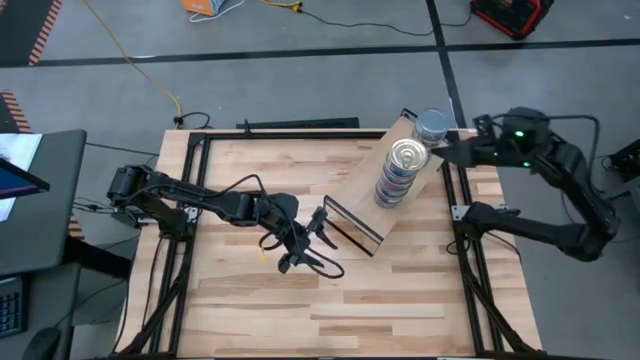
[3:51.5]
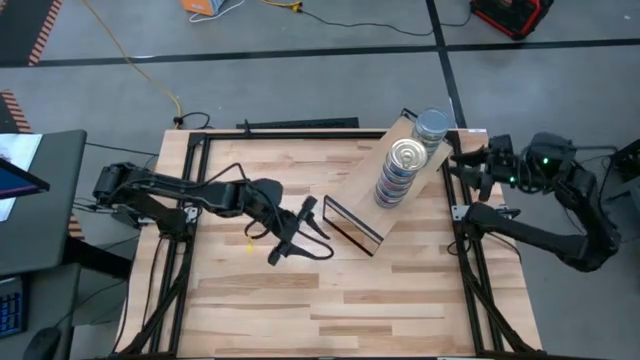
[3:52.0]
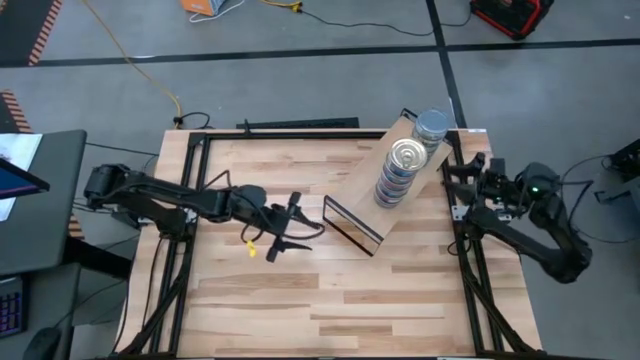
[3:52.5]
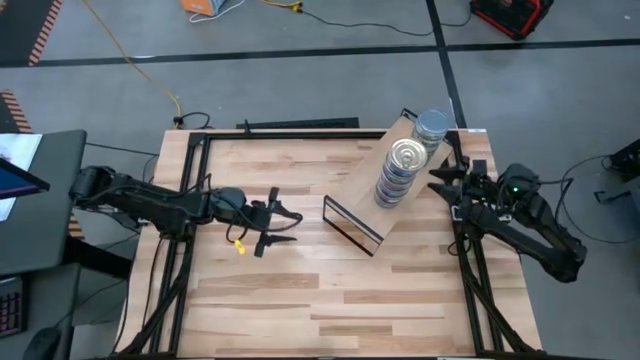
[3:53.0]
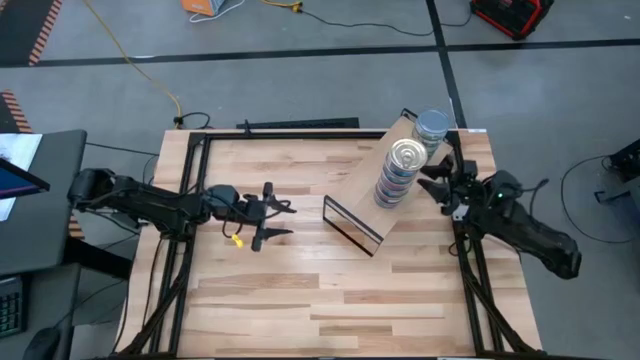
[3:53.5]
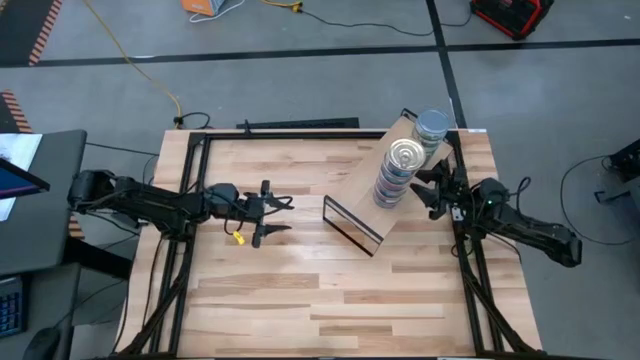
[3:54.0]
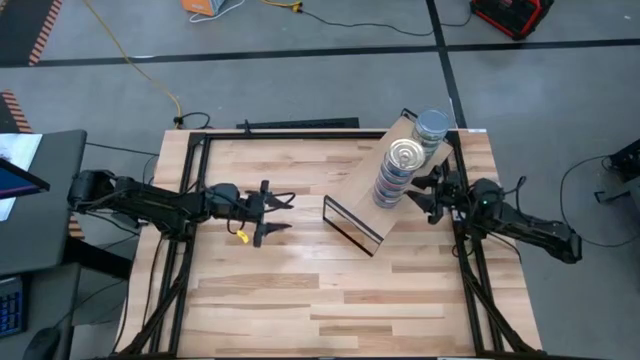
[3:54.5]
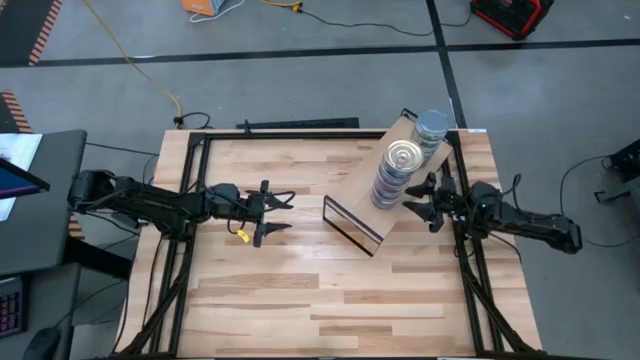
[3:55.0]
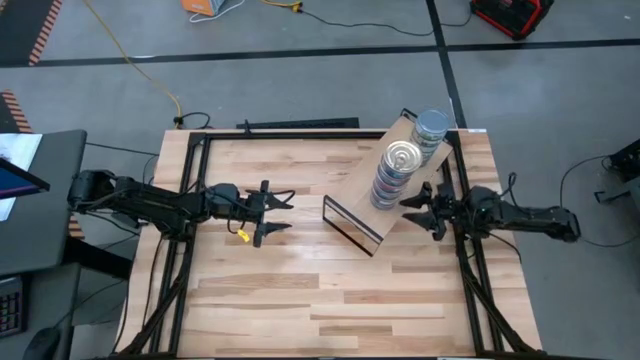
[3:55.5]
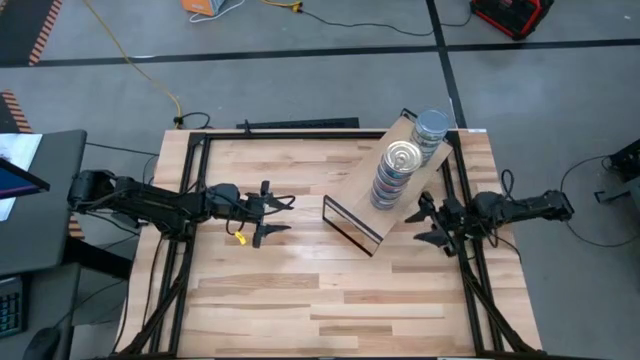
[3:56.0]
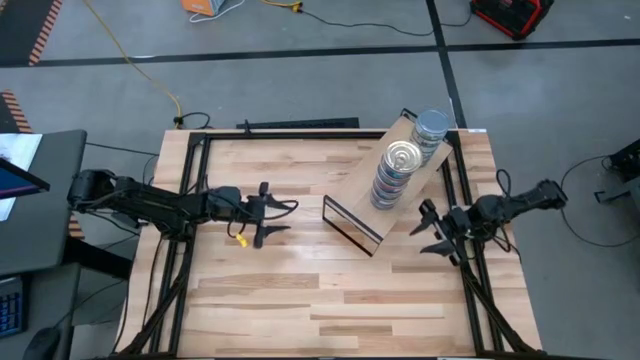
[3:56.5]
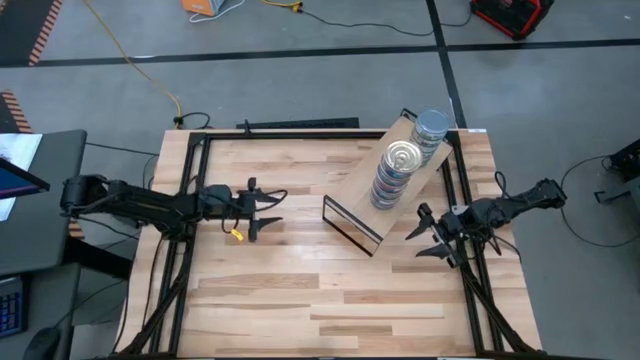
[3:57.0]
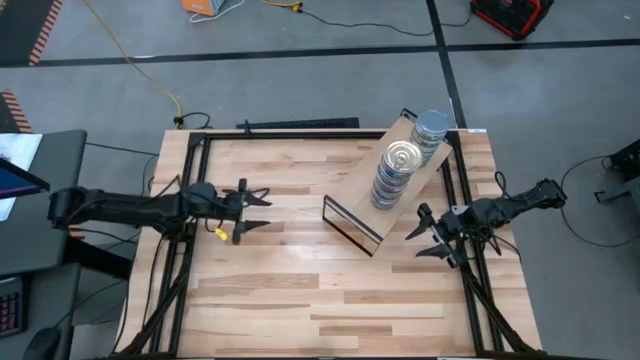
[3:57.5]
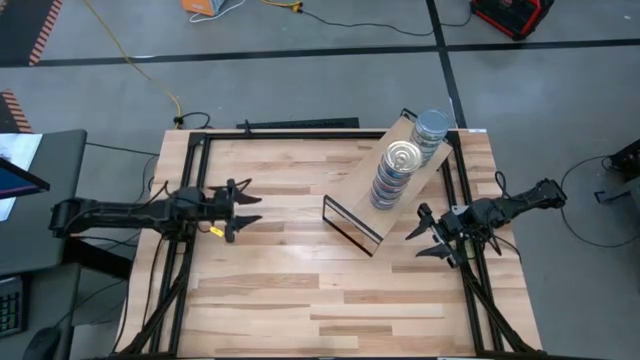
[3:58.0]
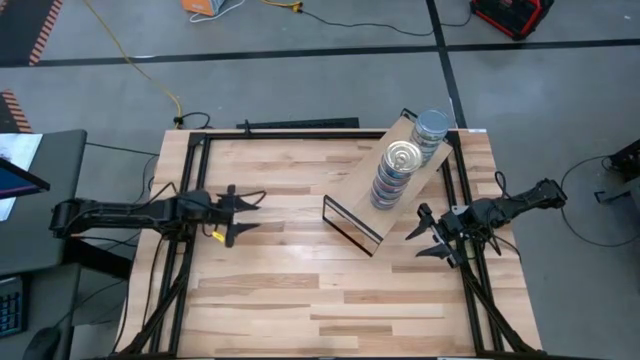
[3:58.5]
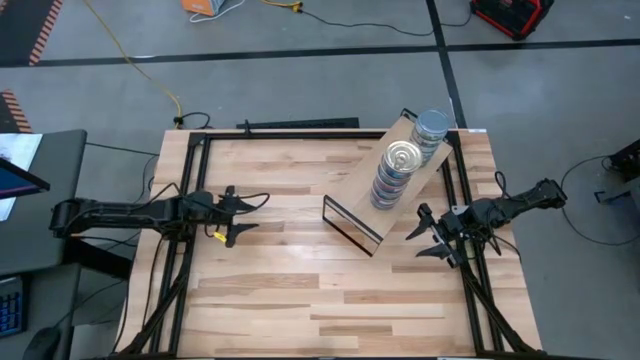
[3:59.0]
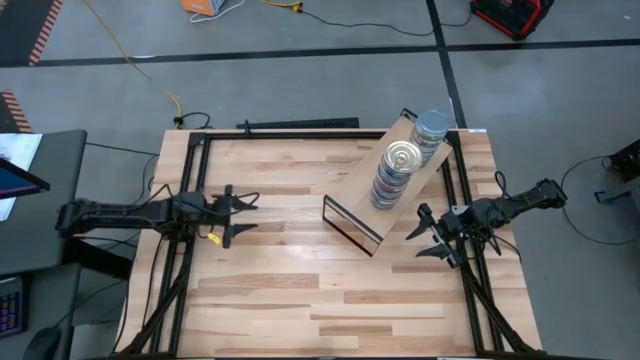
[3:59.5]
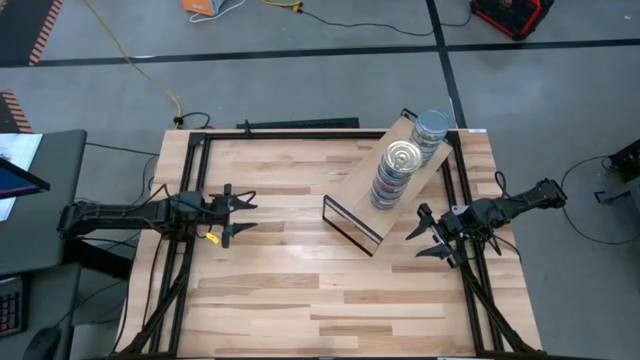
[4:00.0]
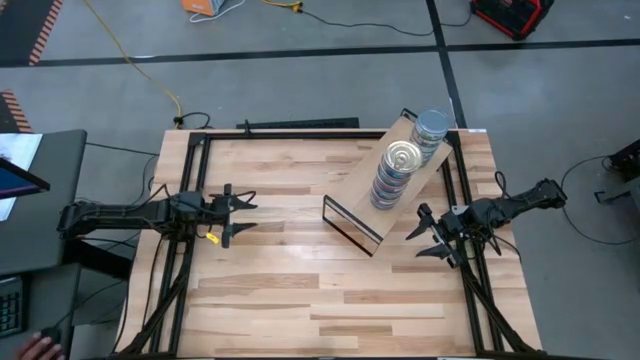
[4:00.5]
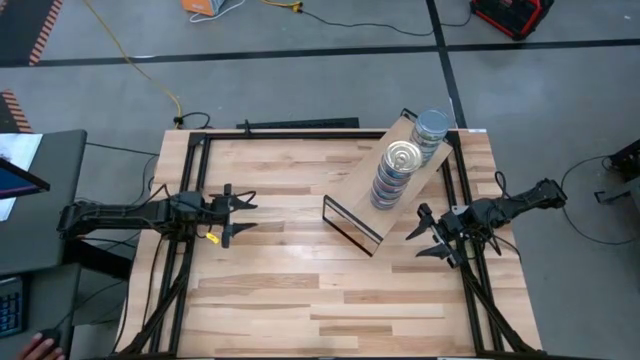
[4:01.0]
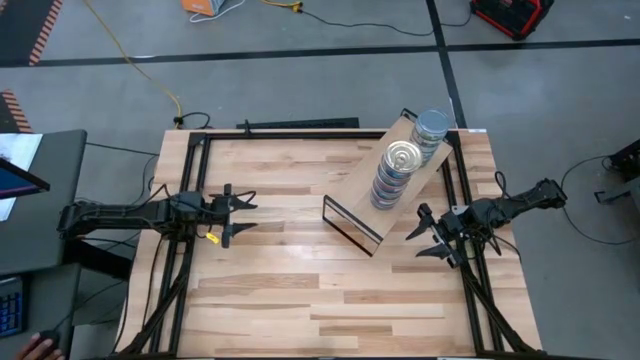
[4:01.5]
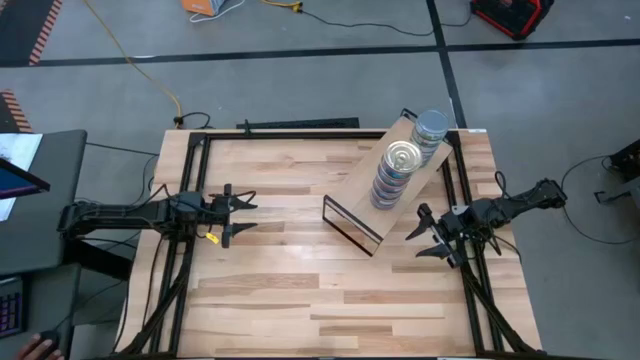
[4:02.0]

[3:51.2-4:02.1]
Task: Stack canned seafood by type on shelf
Return to Home Position

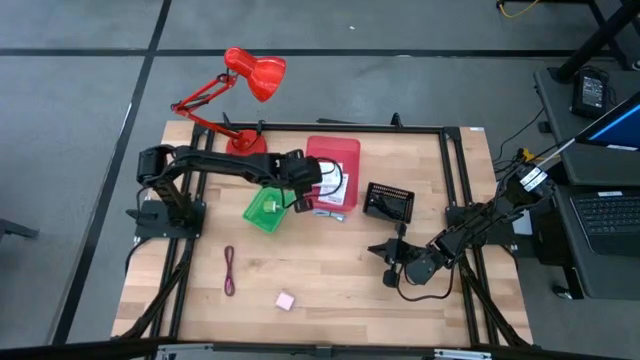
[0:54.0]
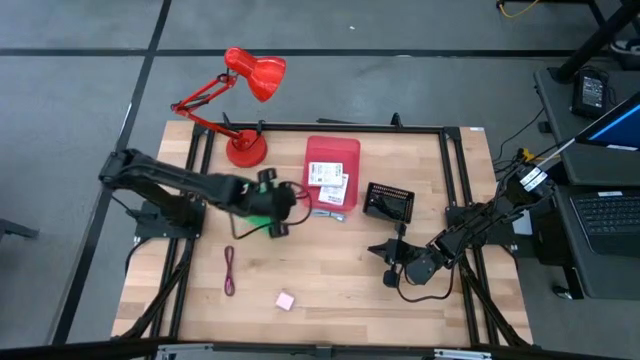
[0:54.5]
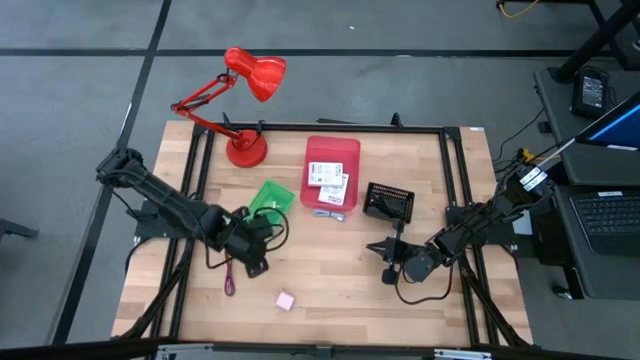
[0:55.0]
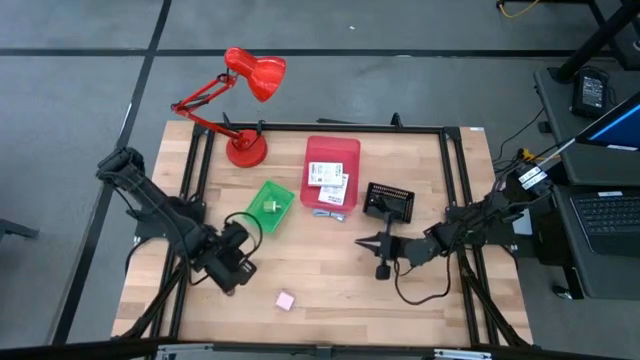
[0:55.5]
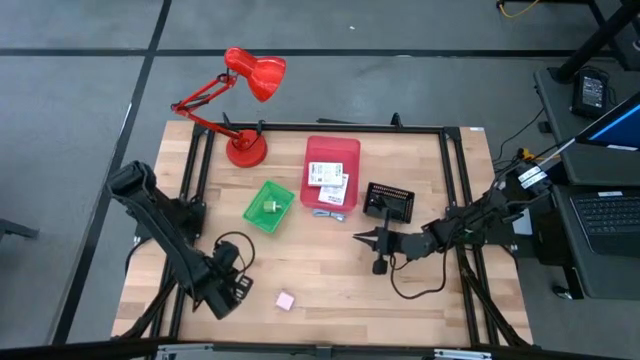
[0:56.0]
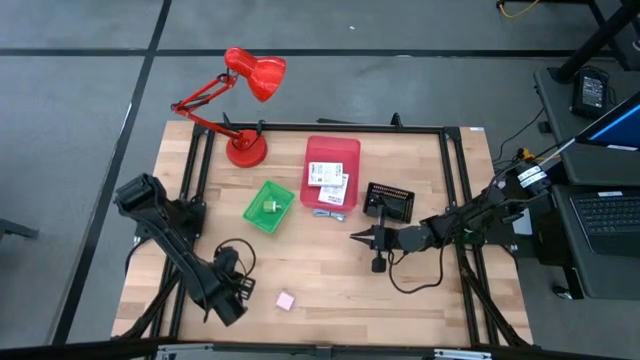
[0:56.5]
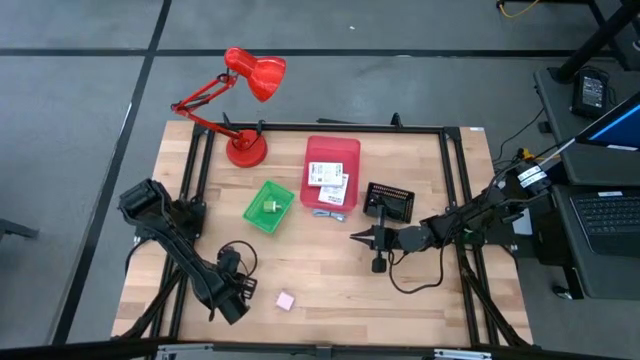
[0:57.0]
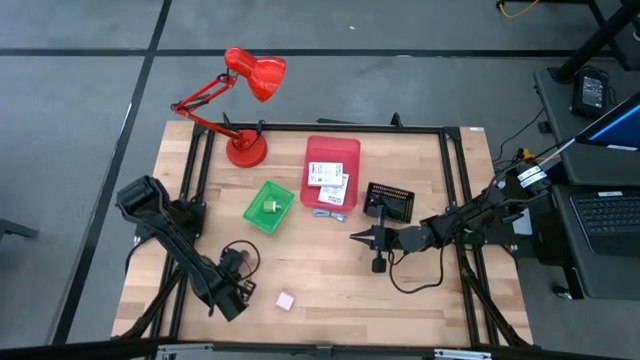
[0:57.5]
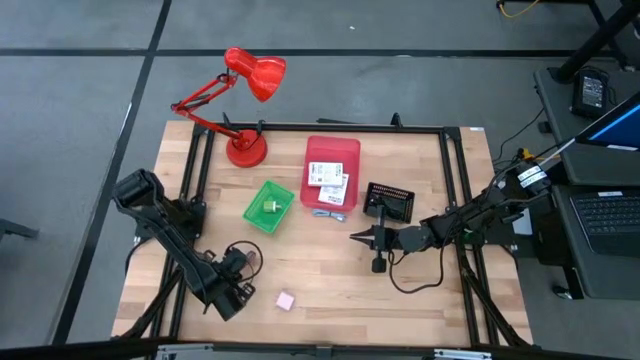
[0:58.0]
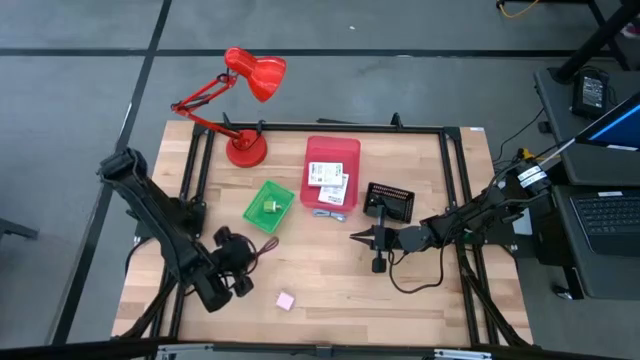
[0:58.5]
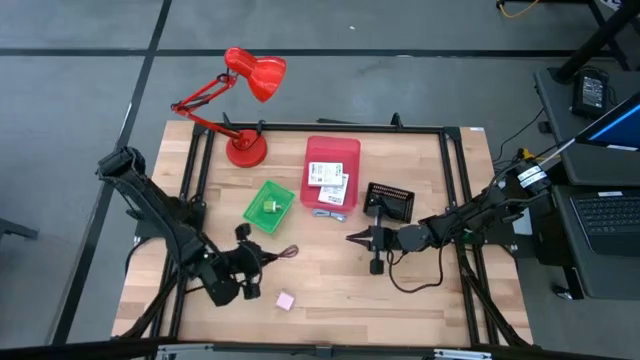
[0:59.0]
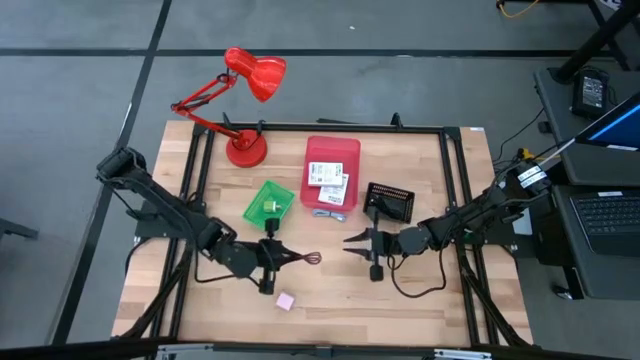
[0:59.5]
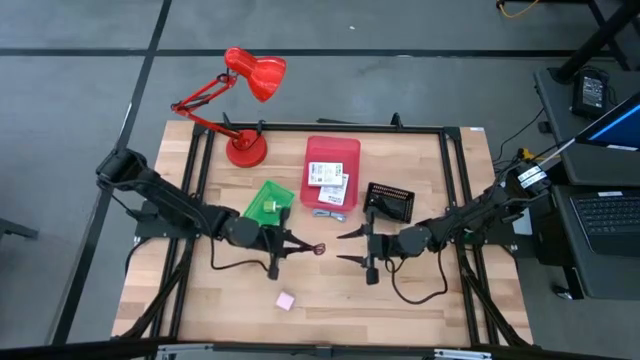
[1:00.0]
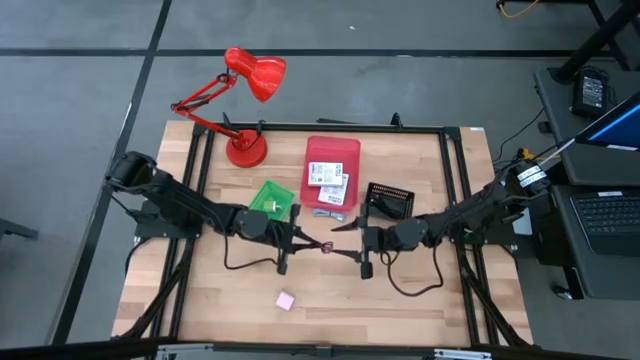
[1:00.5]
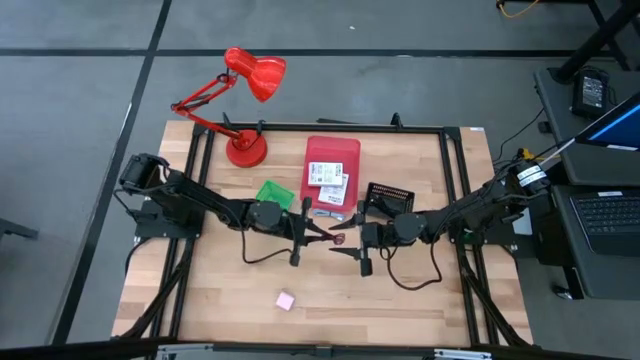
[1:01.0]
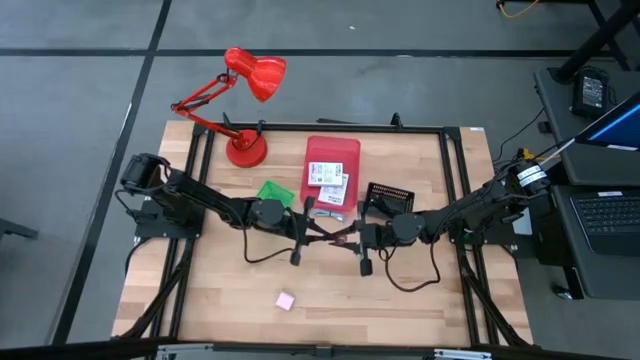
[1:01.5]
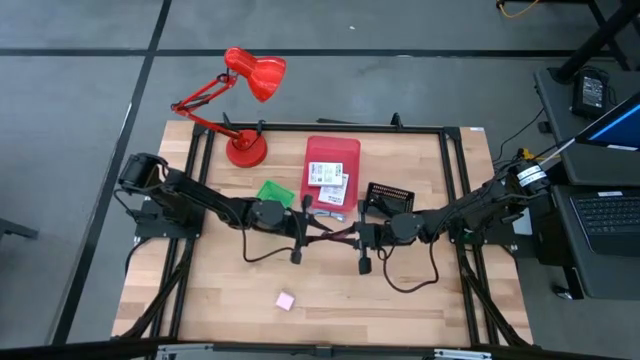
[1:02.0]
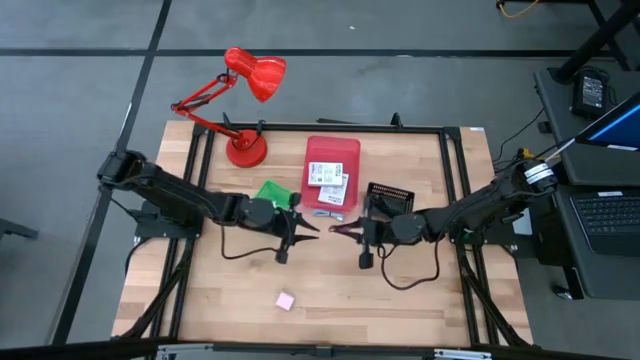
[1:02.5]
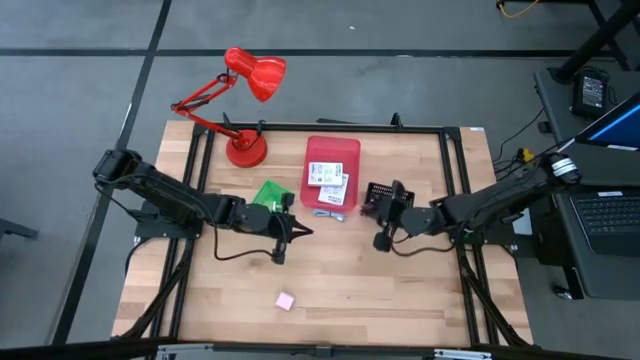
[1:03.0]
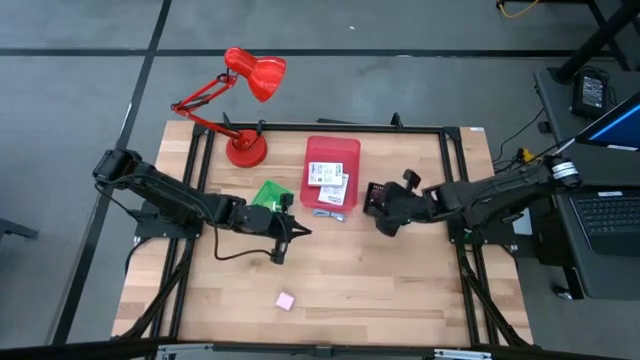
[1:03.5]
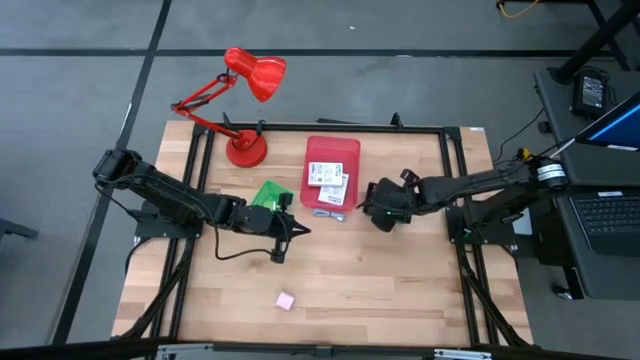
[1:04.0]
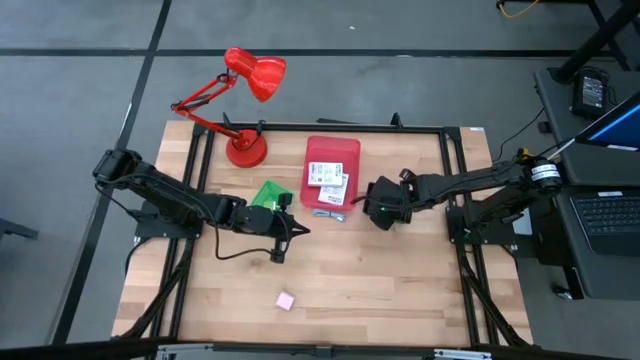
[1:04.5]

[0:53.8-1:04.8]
Task: Pick and place items into bin
Put the pink charger cable into the black bin
